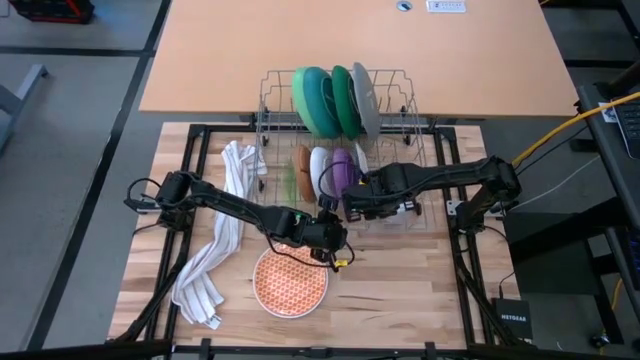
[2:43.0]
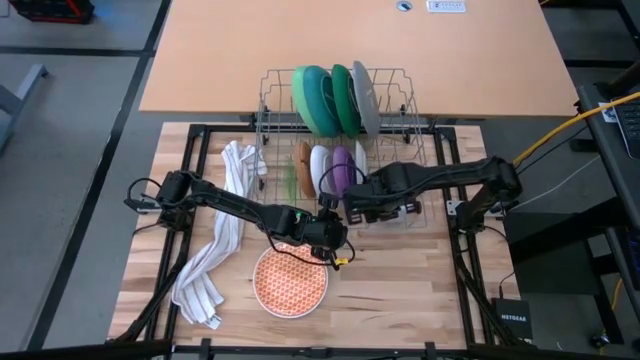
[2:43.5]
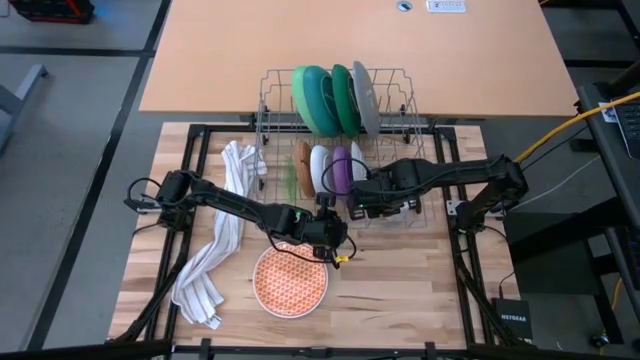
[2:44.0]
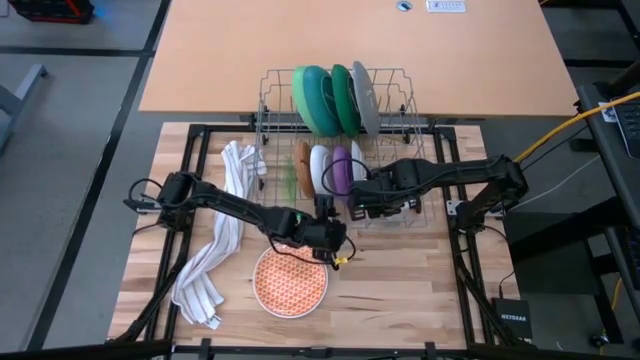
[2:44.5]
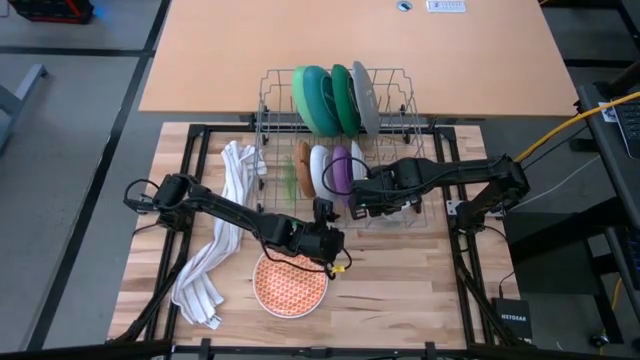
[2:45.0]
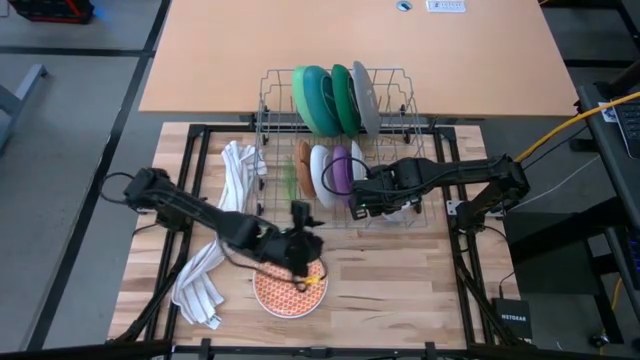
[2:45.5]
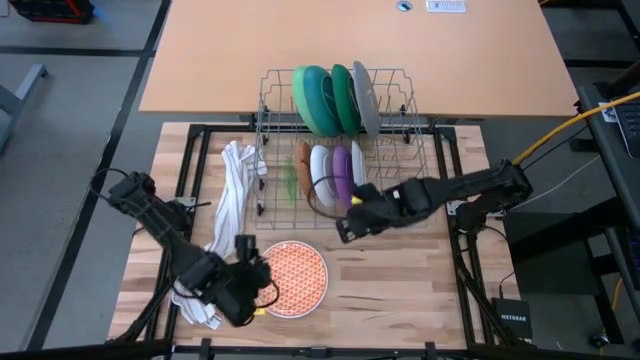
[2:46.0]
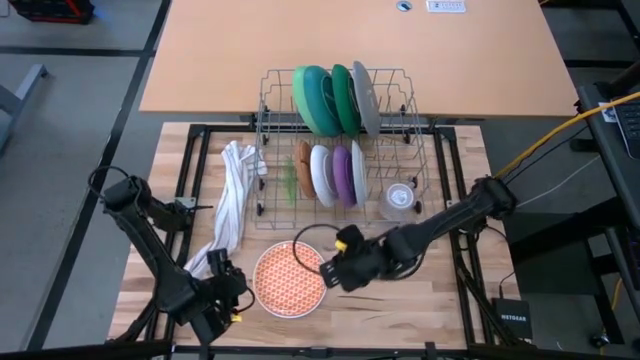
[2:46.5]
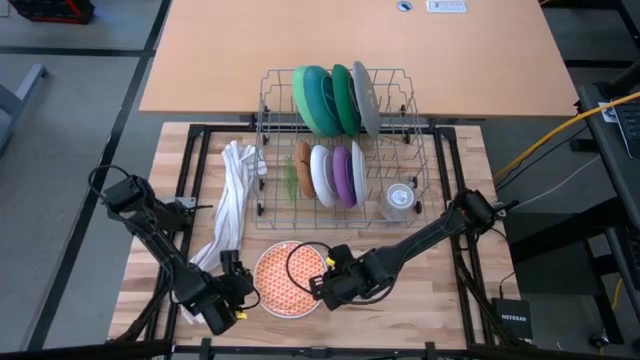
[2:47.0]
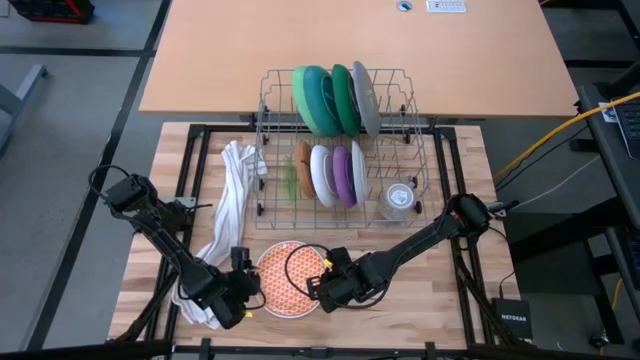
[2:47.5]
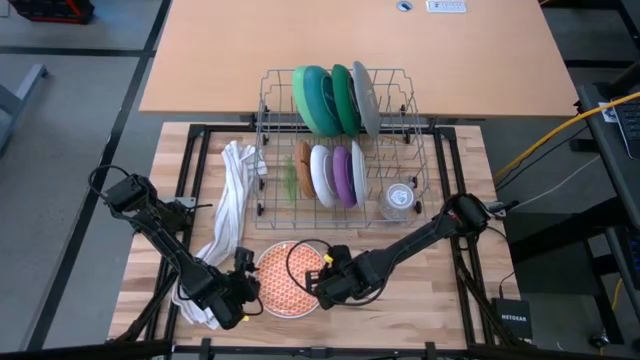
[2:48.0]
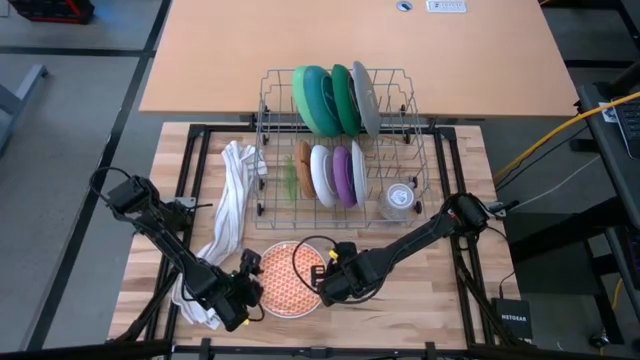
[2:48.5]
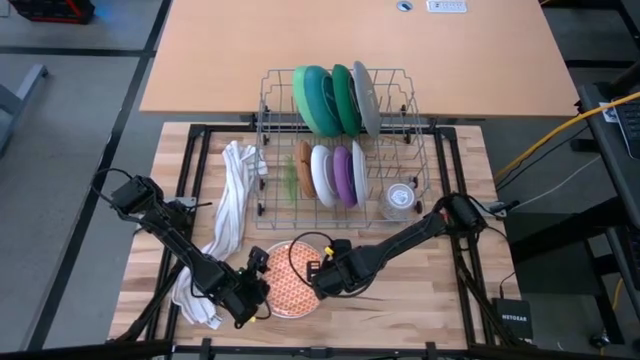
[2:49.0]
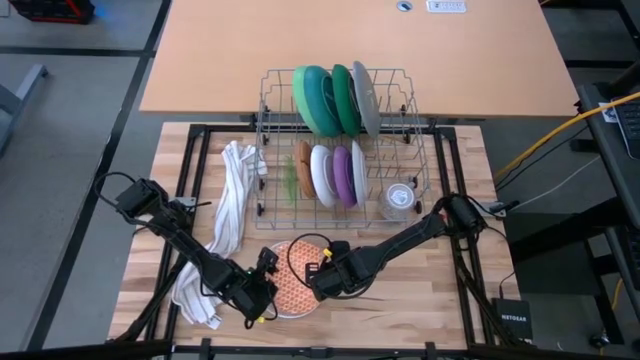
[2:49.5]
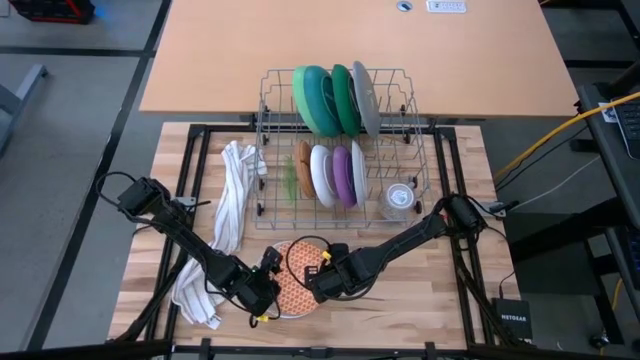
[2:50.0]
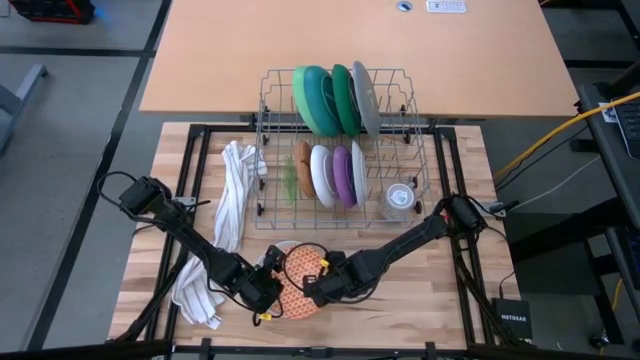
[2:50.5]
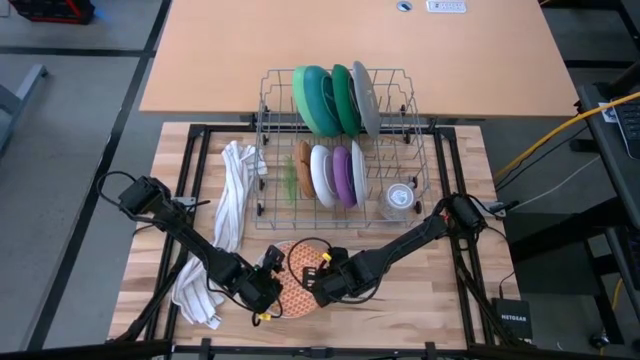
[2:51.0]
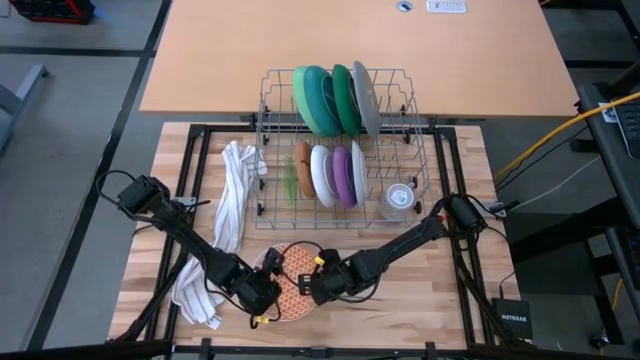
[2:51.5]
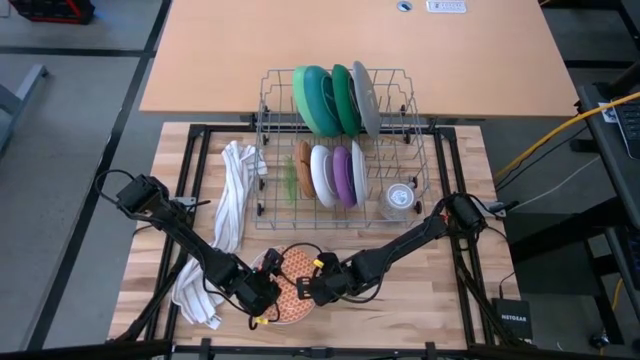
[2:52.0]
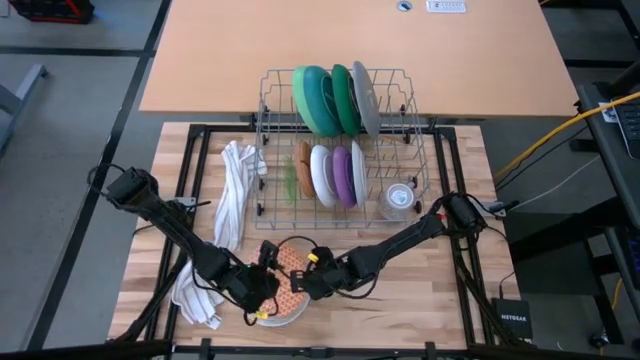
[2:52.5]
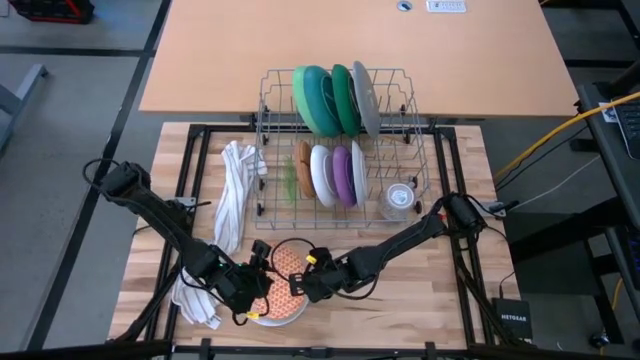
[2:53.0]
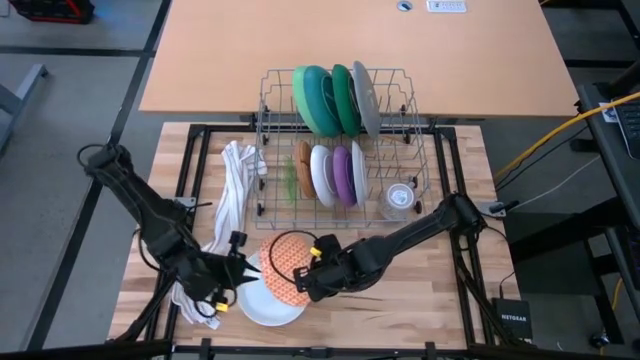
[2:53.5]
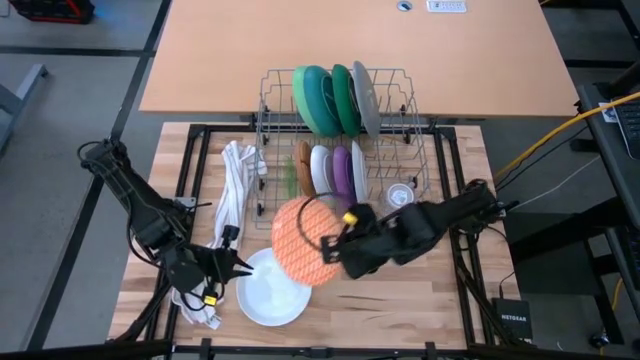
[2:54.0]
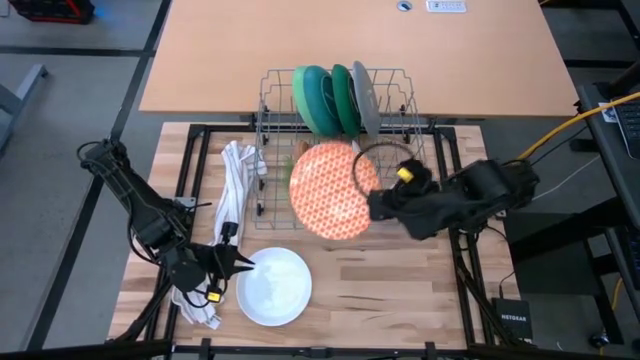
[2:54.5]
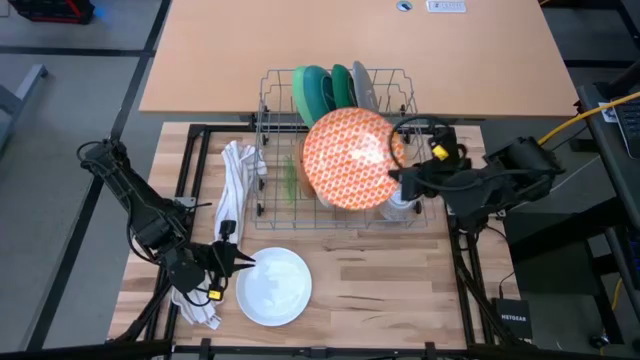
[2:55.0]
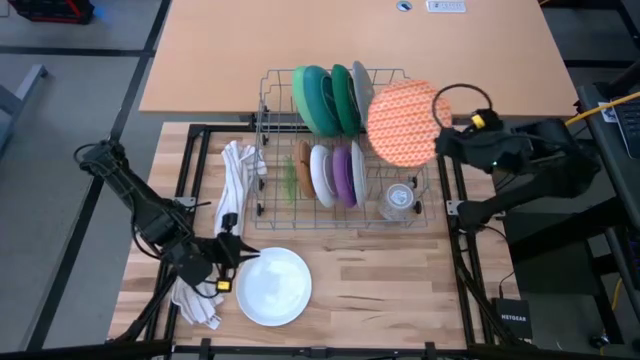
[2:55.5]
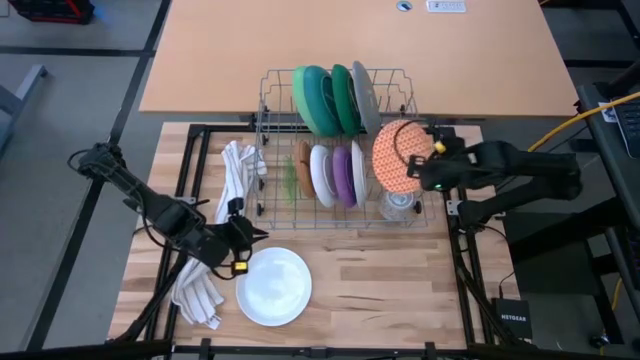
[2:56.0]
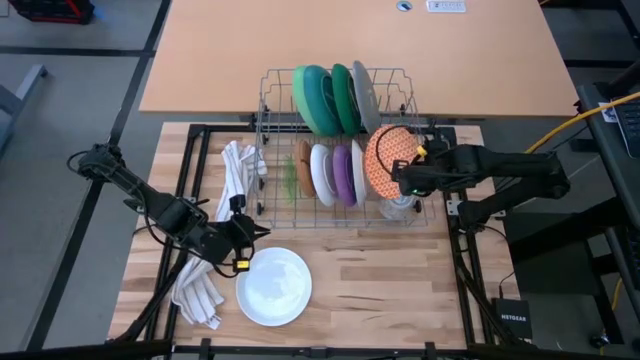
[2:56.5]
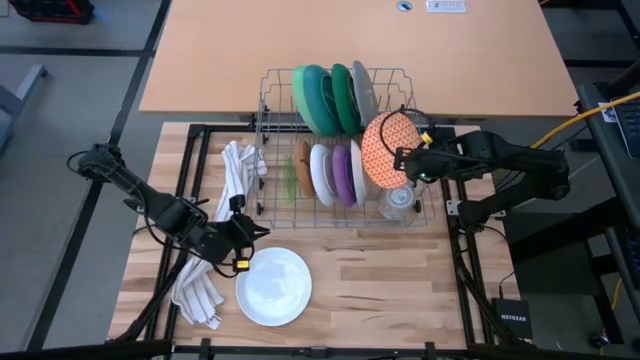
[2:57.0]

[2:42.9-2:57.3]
Task: Sort dishes
Put the orange plate into the dish rack

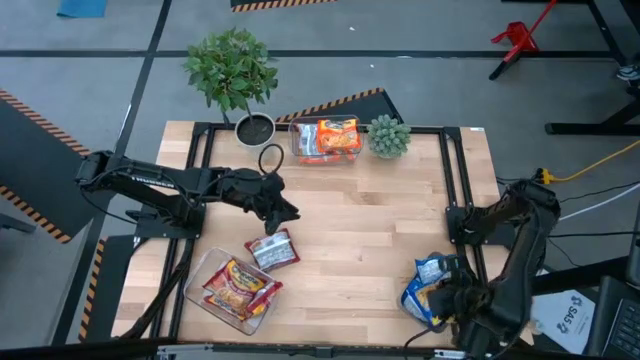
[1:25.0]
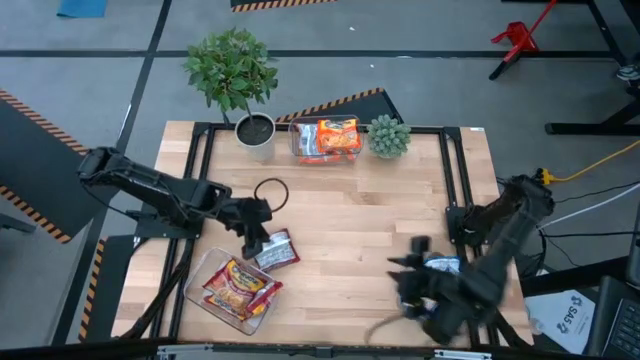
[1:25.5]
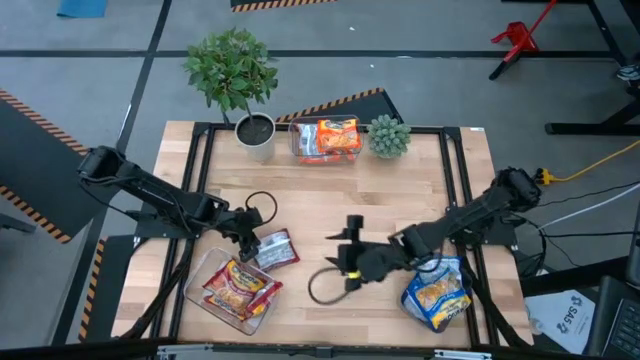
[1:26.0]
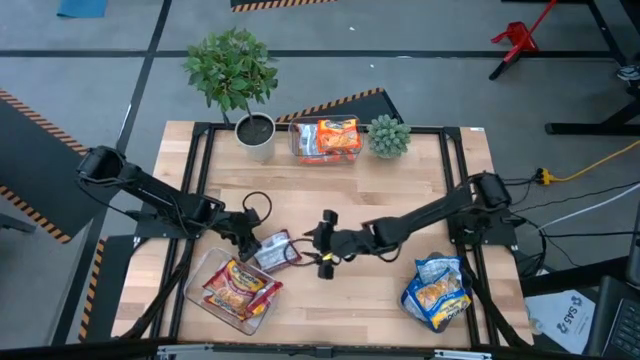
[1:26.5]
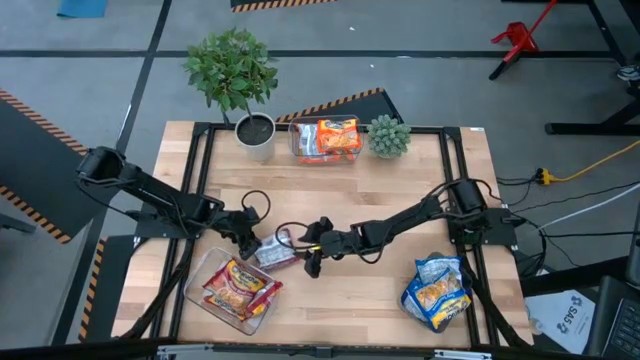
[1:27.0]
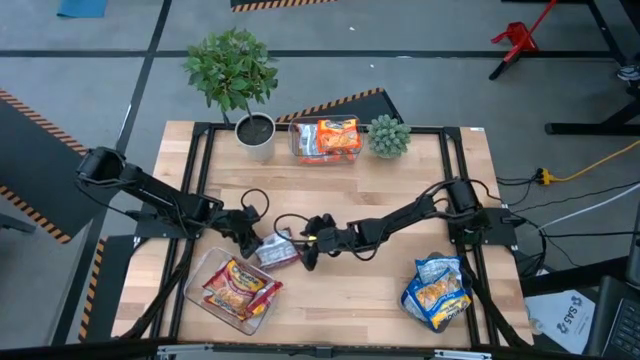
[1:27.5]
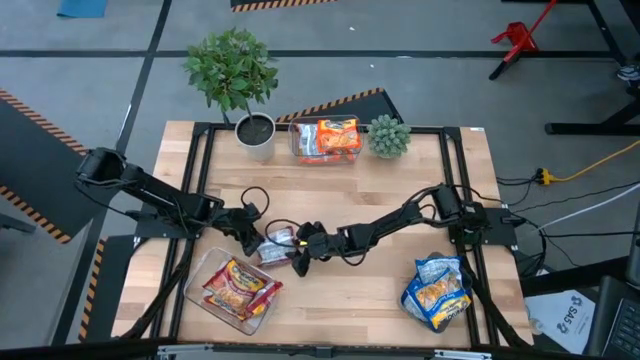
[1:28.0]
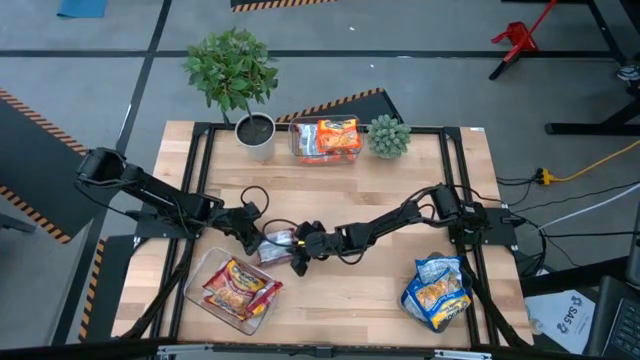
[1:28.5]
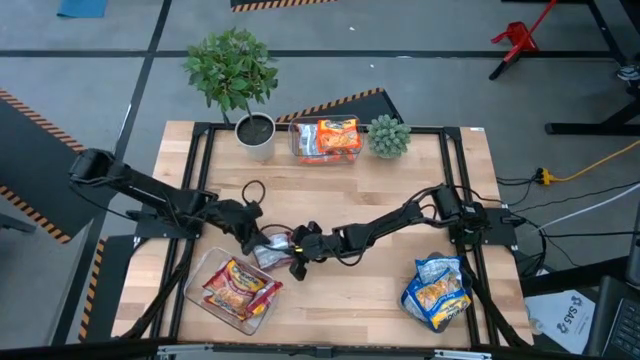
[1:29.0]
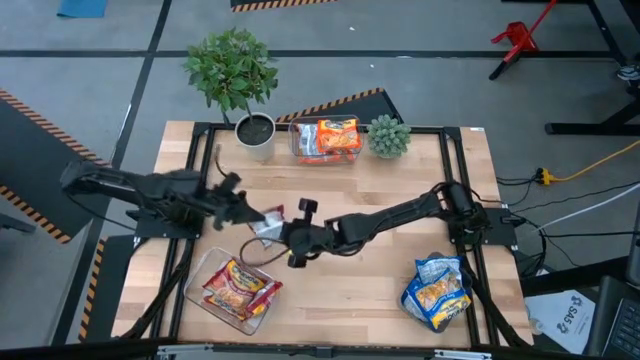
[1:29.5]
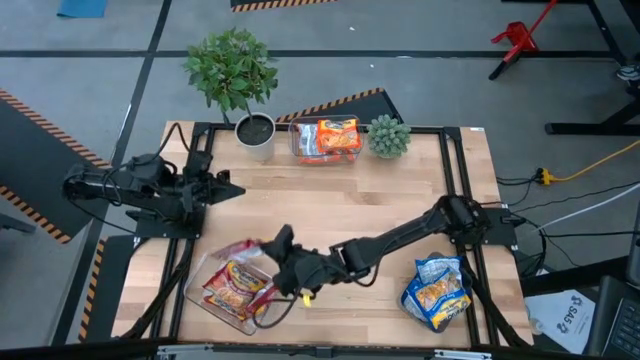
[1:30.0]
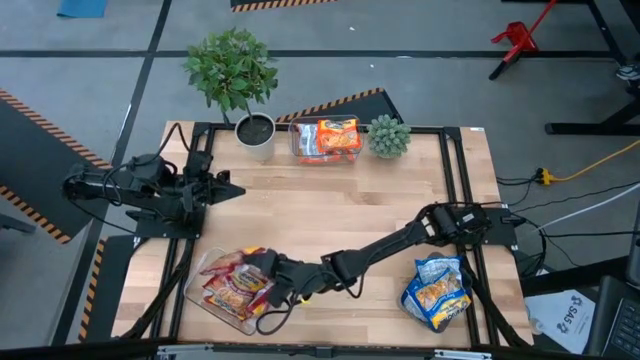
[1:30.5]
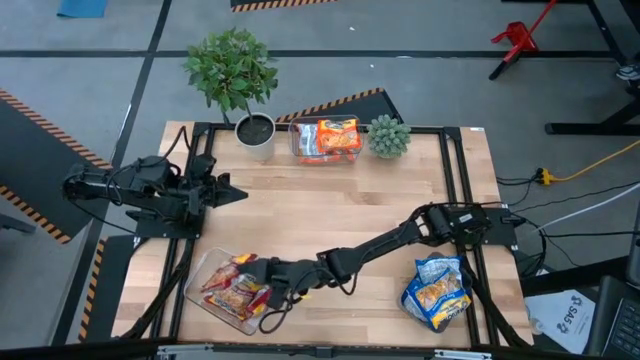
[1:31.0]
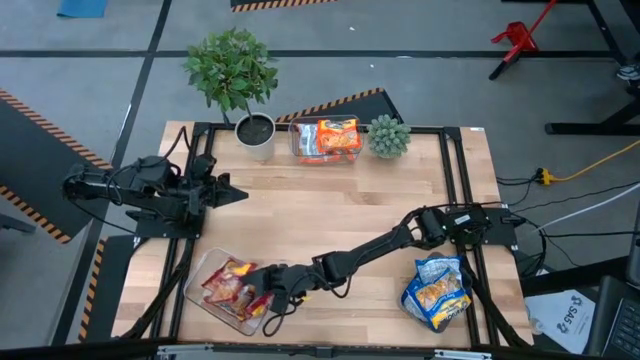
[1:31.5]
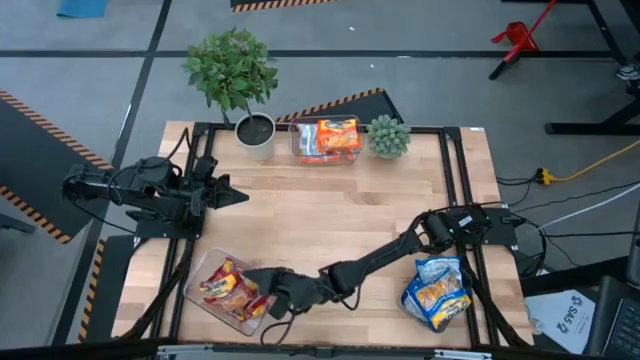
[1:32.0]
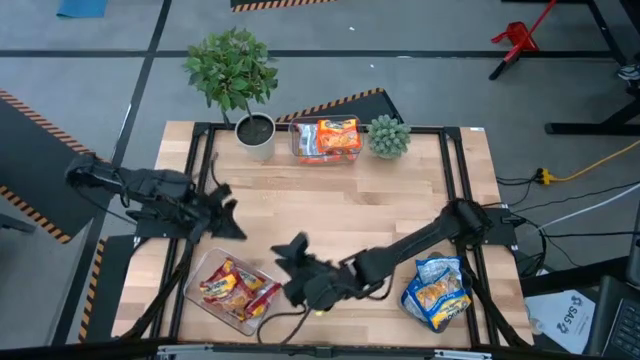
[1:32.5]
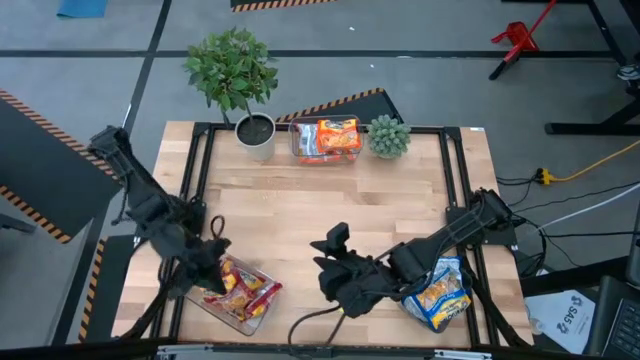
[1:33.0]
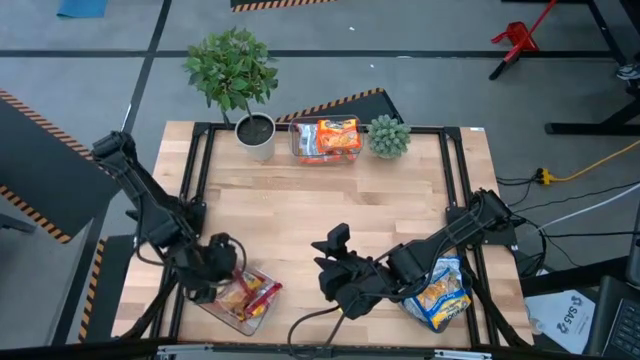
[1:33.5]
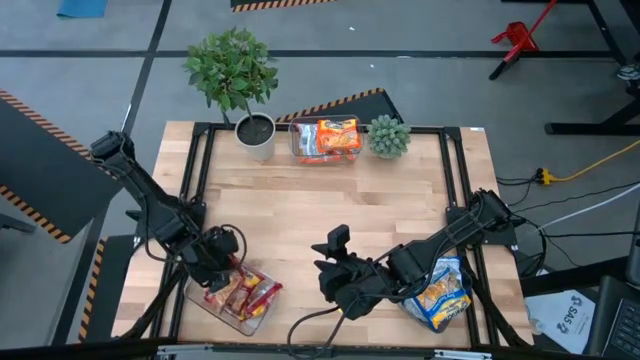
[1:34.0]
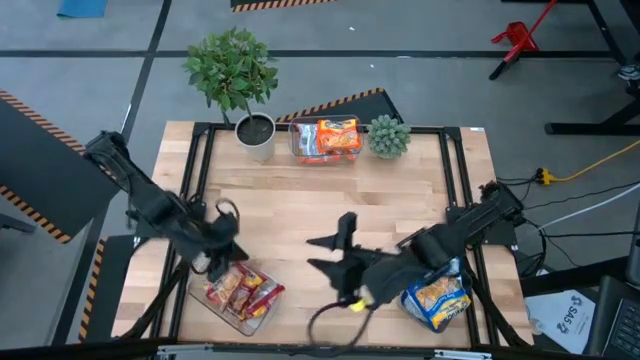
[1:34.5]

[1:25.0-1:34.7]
Task: Sort Maruchan noodles
Put the red noodle pack into the bottom transparent bin
